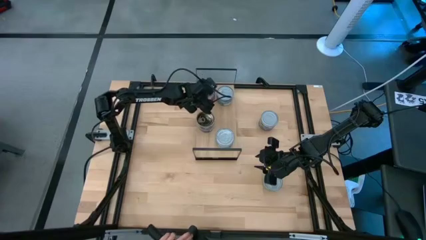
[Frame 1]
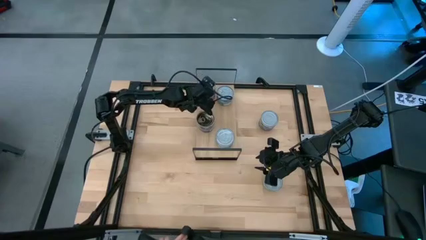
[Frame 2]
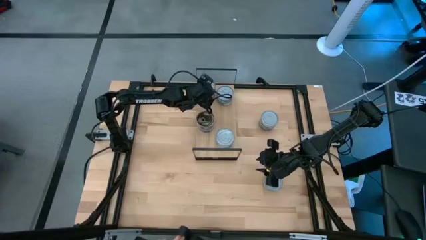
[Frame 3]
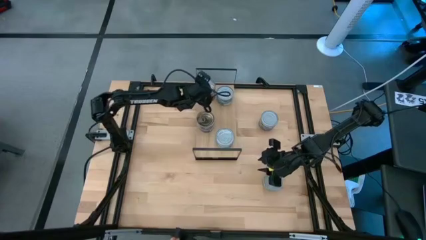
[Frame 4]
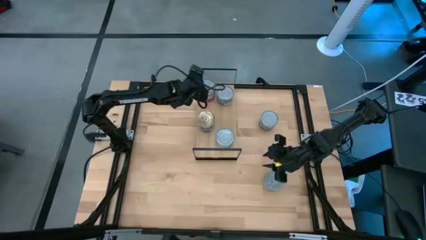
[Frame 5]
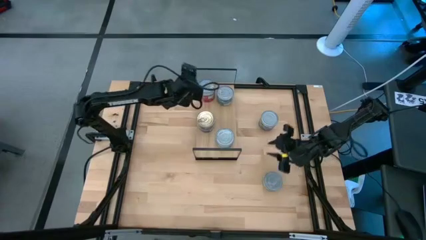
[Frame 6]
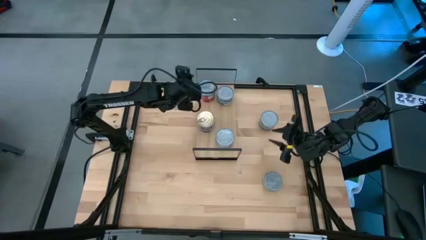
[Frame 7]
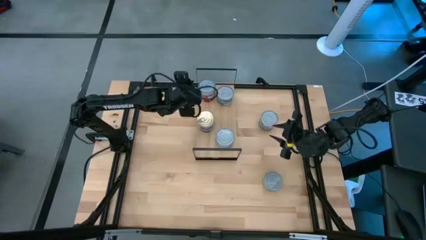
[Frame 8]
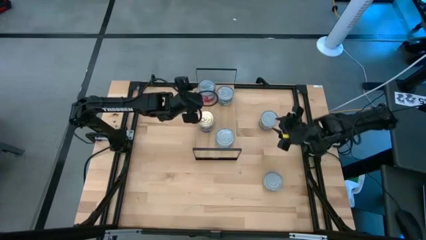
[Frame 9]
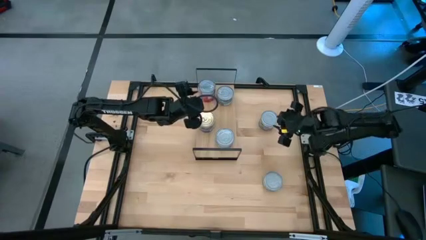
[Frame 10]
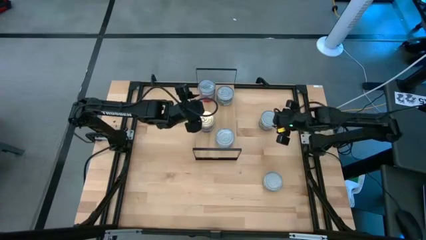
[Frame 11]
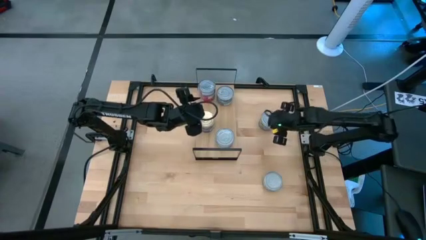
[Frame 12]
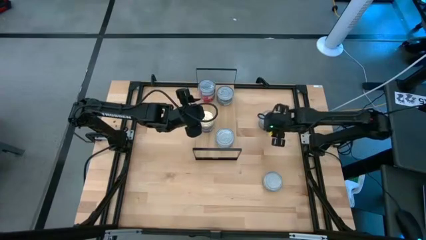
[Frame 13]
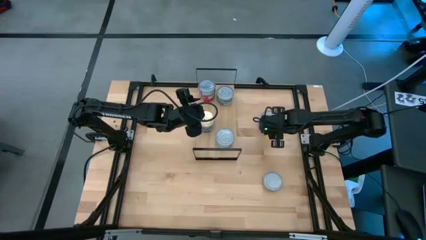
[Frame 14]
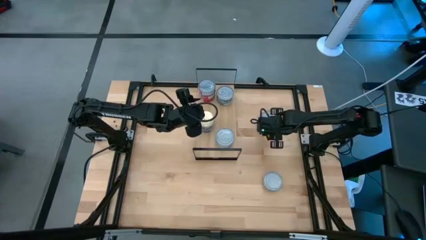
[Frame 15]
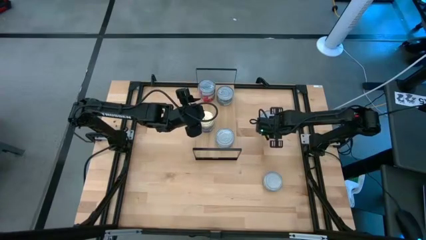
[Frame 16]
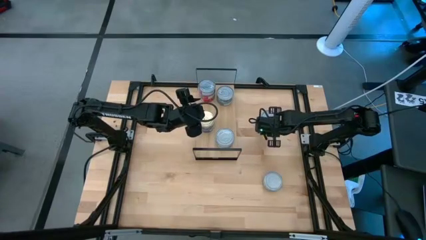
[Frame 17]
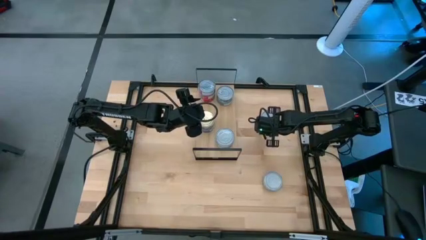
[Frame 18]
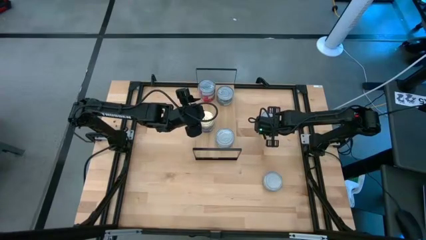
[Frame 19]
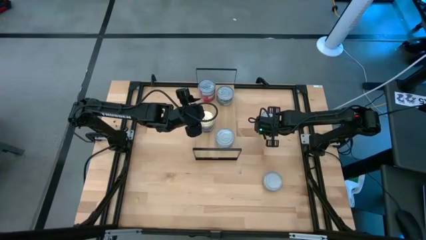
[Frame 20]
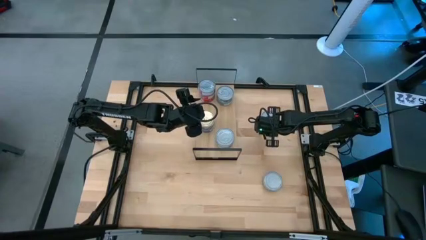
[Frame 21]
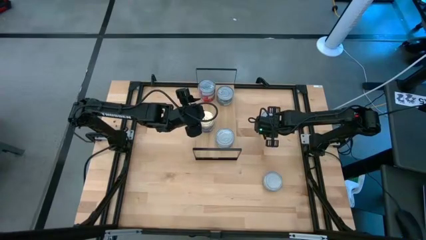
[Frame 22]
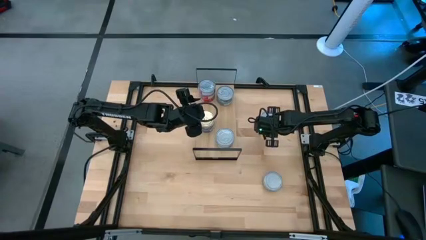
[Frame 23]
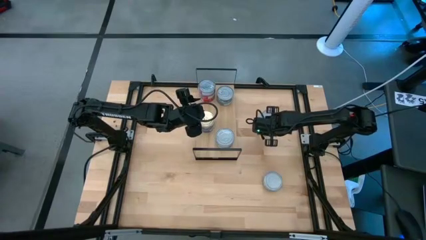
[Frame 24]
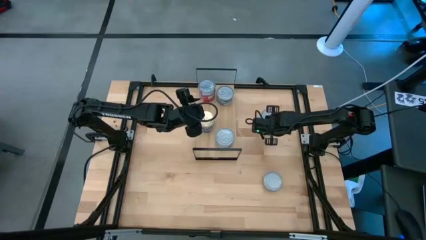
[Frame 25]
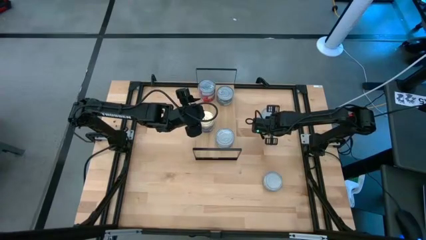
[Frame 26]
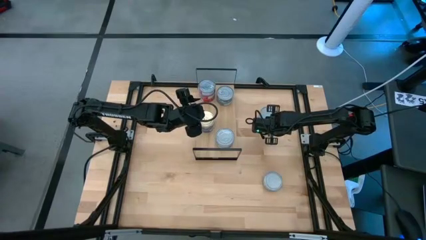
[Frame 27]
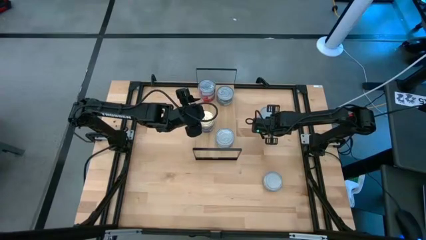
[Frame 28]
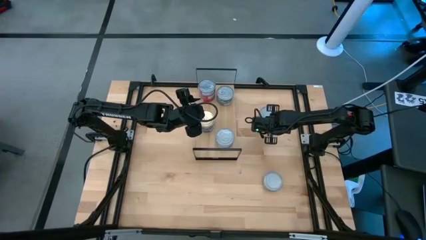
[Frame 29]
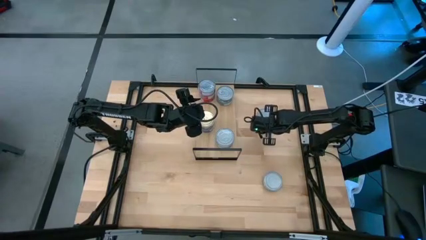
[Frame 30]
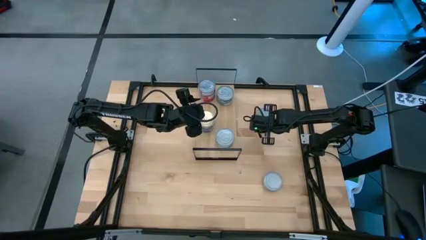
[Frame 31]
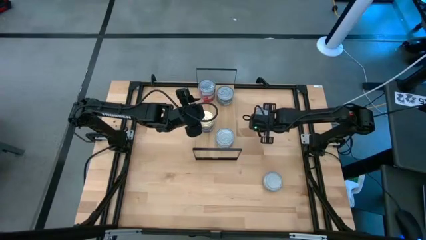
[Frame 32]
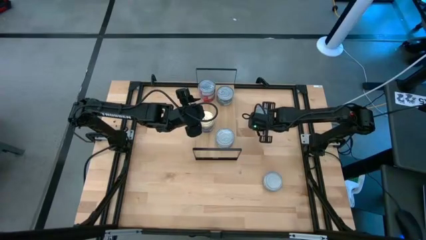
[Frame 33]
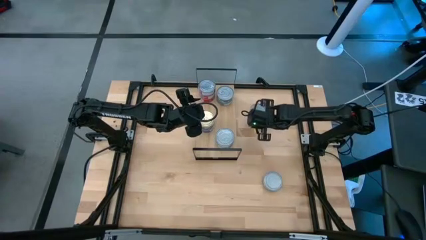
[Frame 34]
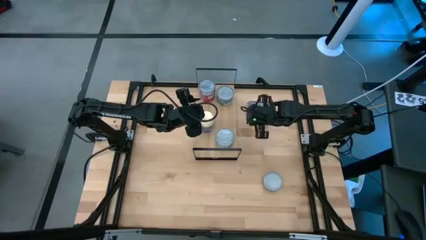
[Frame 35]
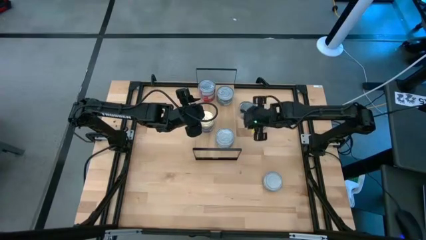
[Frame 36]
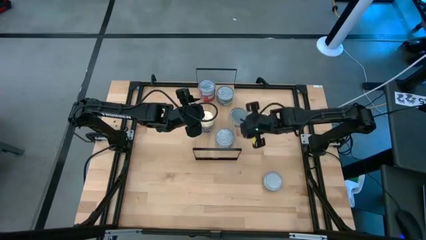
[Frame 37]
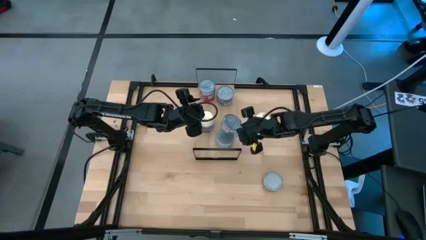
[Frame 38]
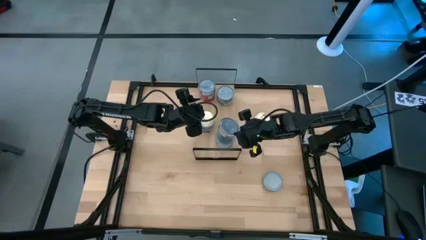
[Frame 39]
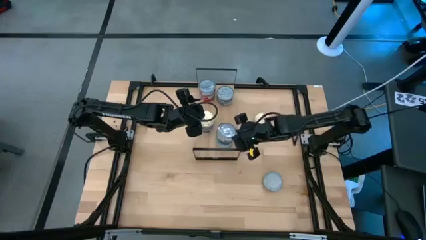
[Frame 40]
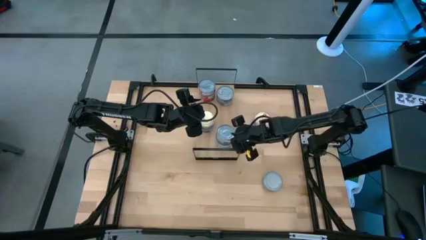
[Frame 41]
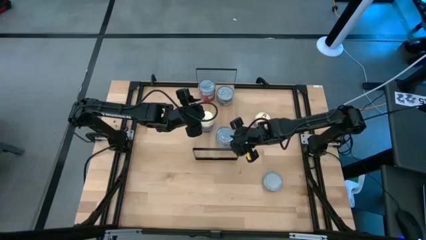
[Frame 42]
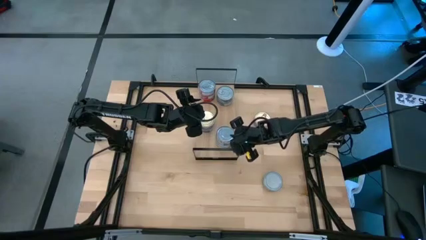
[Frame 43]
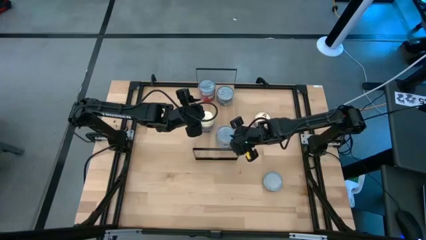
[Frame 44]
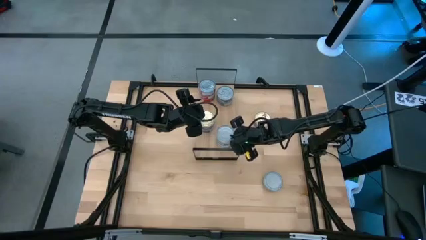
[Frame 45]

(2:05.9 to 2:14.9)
Task: Stack canned seafood by type on shelf
Stack the green tuna can on top of the other green tuna can on the shelf

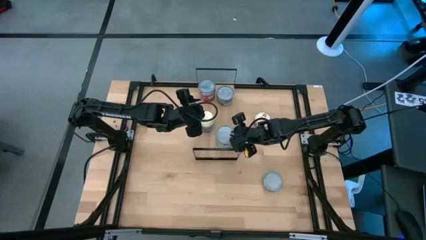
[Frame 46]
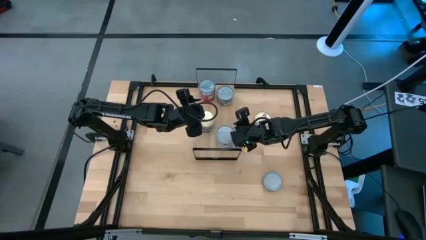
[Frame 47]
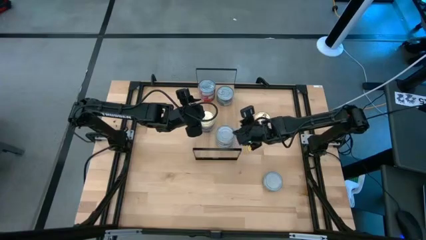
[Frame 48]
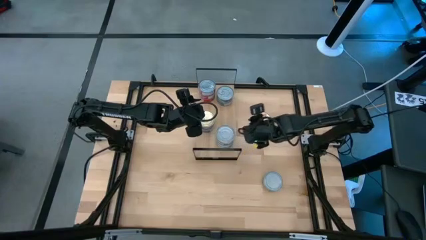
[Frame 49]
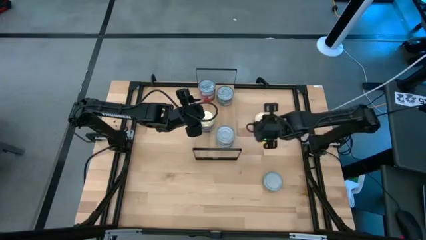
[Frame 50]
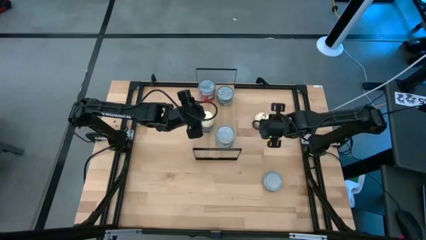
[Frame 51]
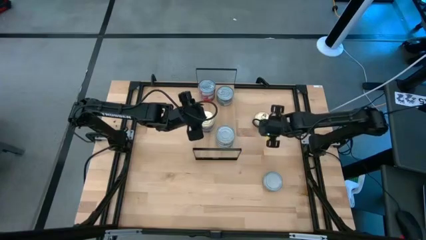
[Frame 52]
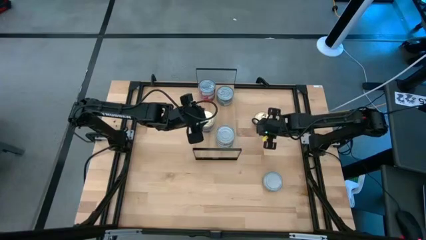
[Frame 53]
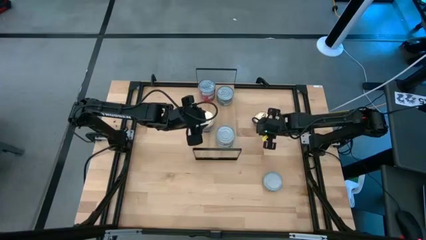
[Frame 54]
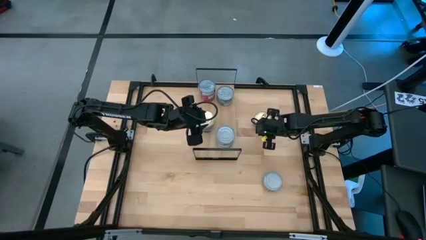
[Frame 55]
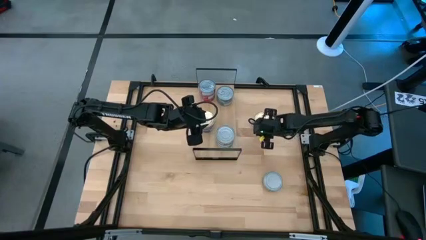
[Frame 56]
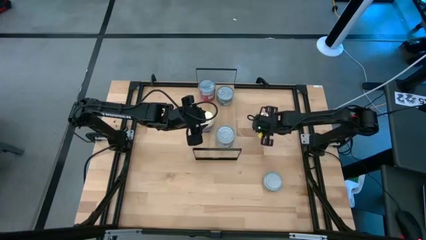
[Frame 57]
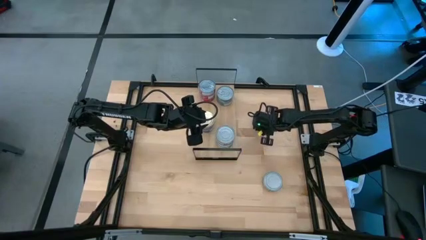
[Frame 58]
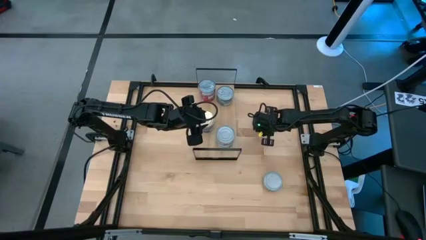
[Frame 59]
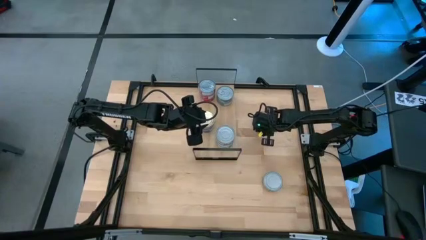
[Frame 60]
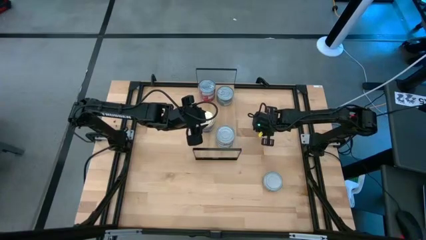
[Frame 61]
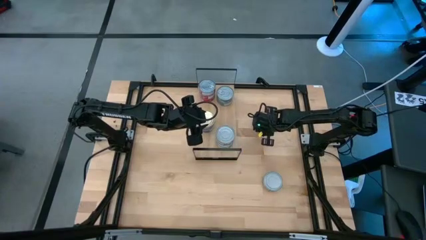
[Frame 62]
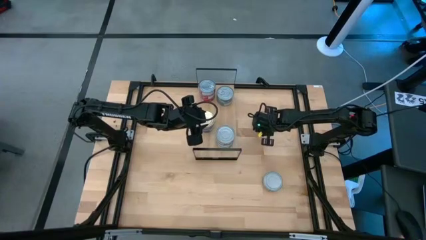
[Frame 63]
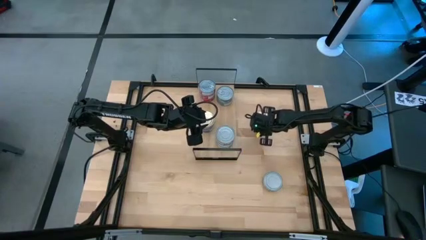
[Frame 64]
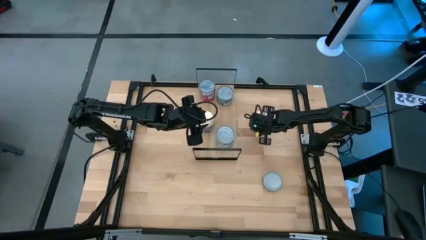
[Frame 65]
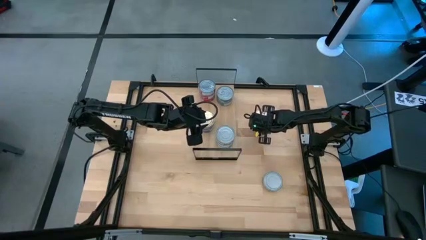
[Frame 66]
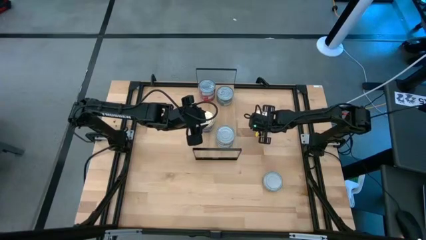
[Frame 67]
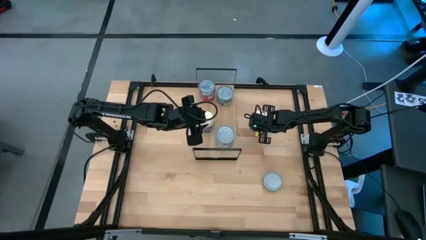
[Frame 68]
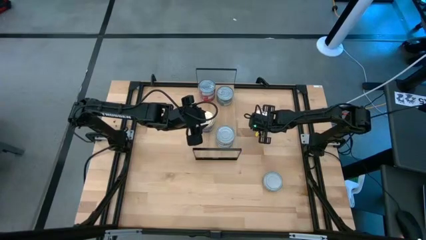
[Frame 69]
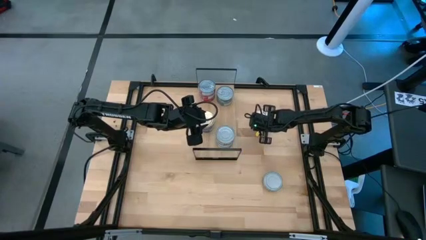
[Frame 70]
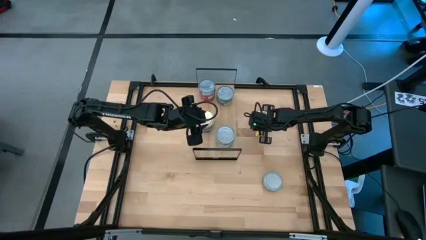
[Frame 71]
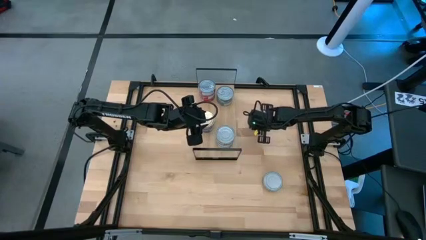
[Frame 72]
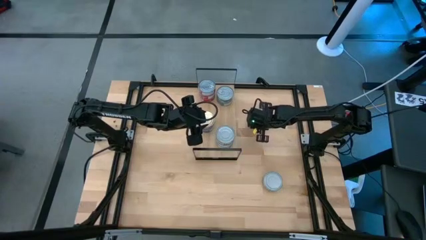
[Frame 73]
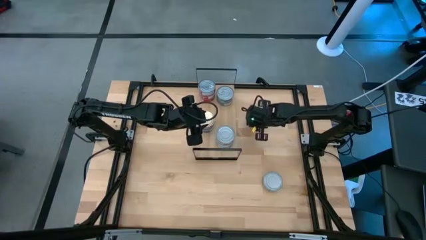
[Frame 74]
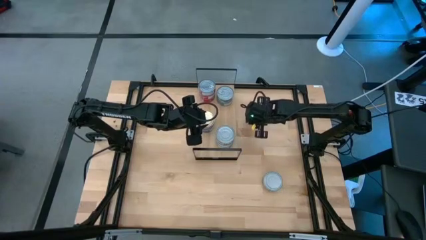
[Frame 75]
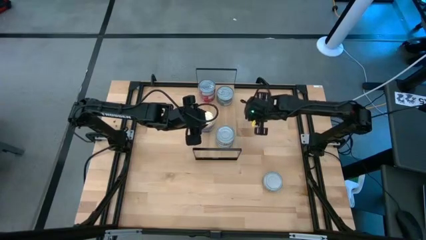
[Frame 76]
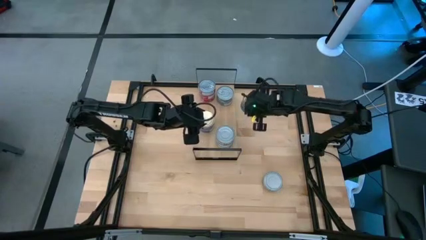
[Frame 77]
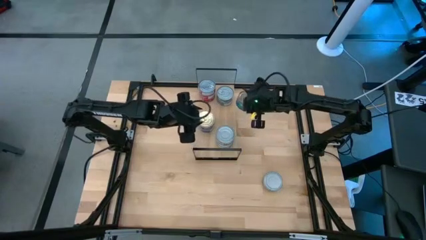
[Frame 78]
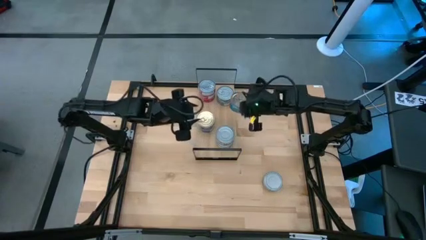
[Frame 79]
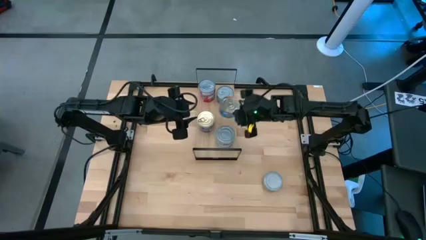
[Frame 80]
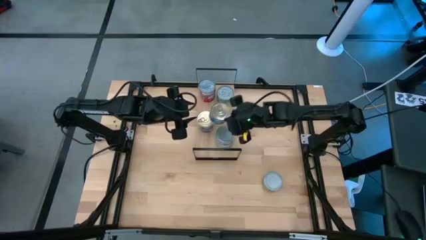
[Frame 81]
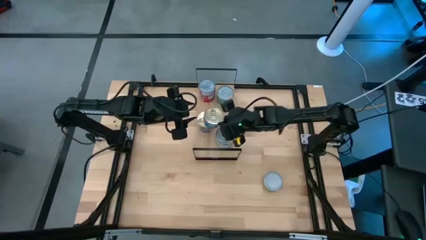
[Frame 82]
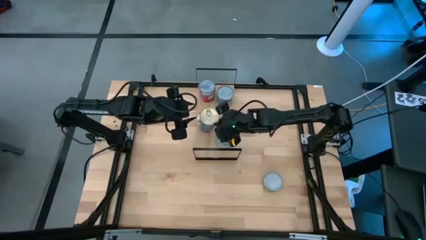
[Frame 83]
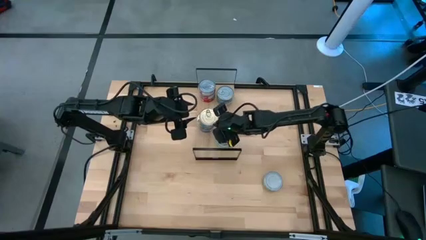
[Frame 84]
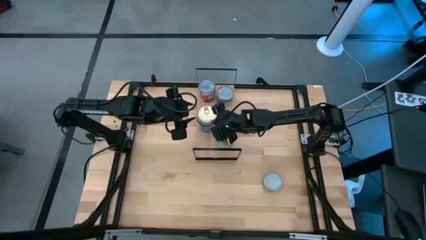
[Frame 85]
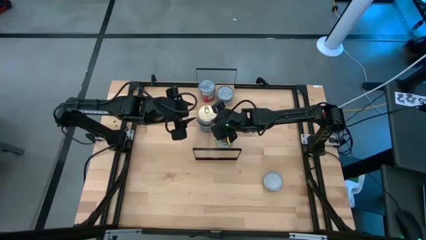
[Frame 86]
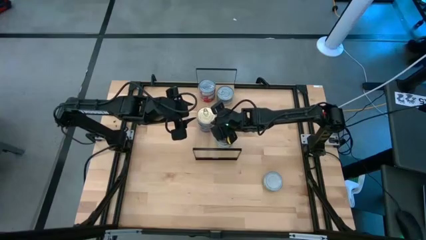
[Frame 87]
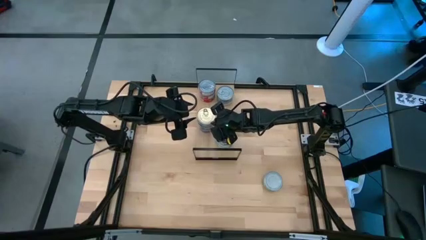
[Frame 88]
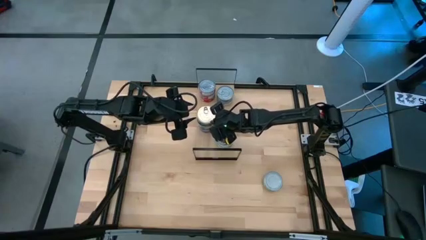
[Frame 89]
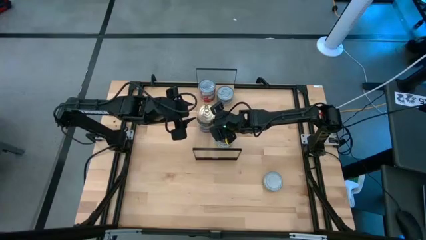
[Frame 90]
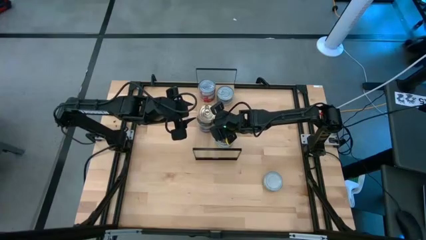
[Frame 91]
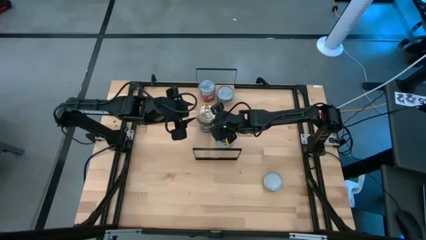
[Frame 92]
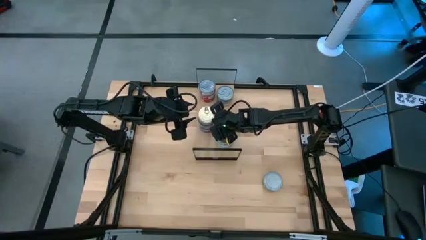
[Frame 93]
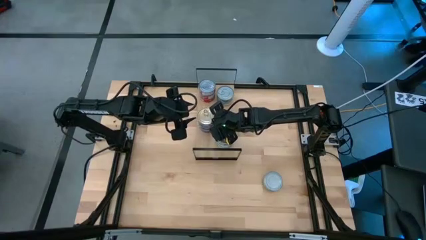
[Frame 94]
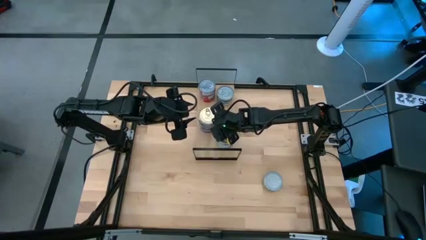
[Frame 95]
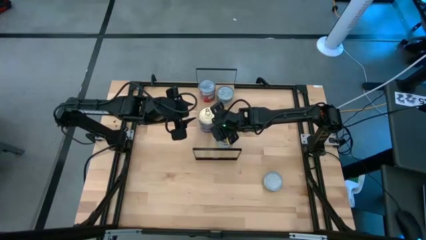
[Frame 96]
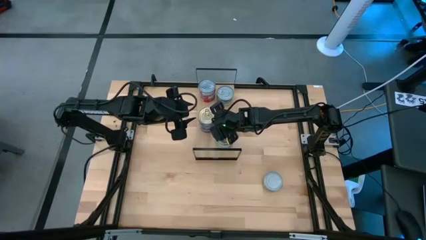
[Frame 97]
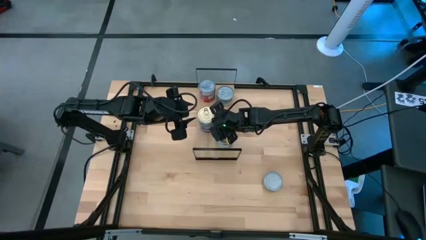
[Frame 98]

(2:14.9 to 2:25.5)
Stack the blue-pink tuna can on top of the other blue-pink tuna can on the shelf
